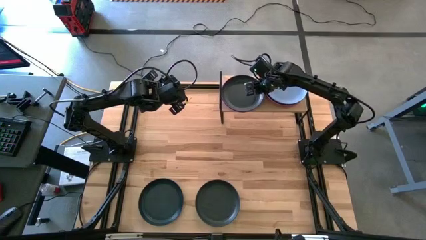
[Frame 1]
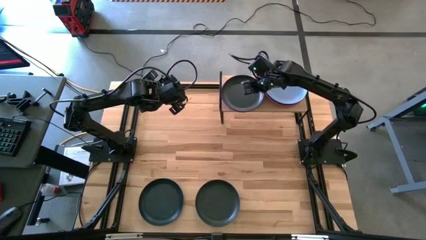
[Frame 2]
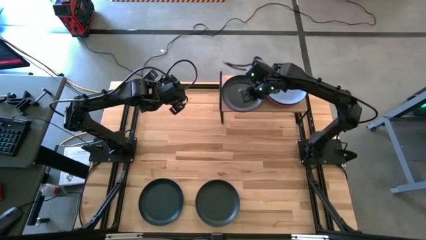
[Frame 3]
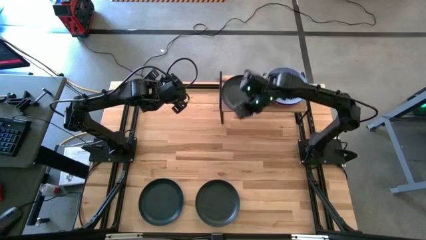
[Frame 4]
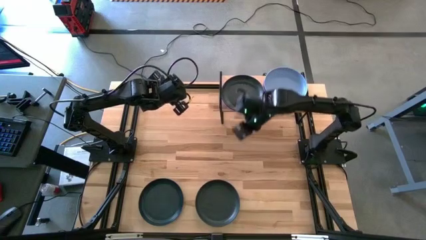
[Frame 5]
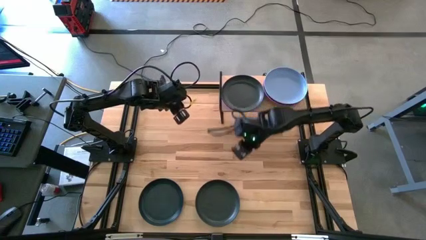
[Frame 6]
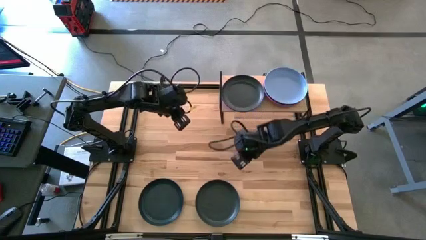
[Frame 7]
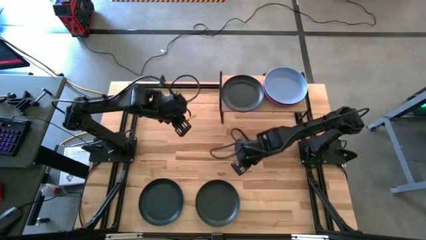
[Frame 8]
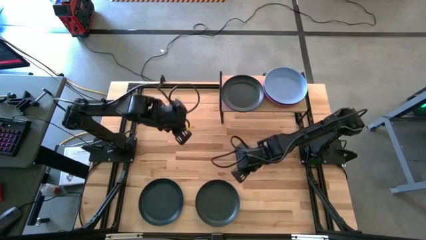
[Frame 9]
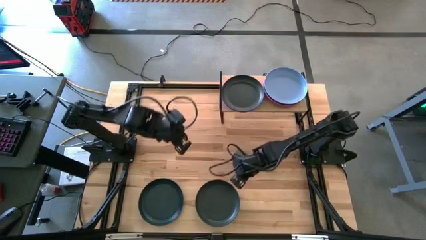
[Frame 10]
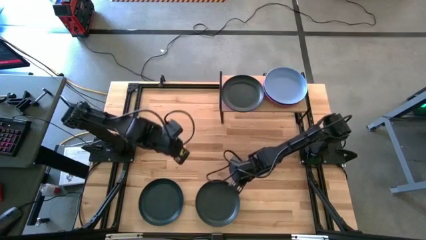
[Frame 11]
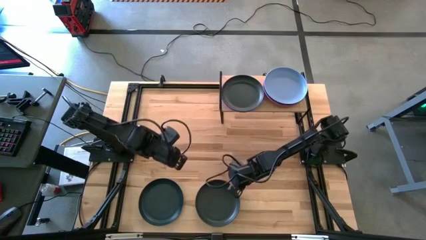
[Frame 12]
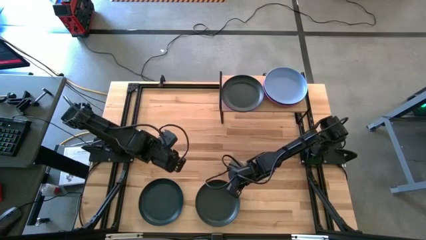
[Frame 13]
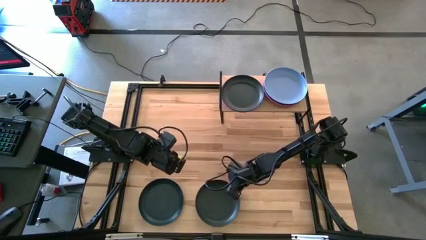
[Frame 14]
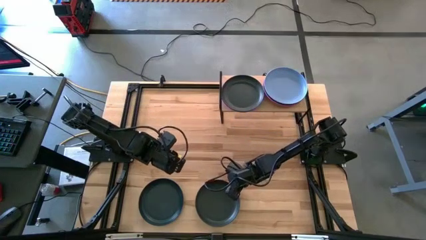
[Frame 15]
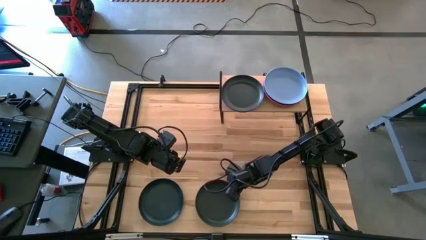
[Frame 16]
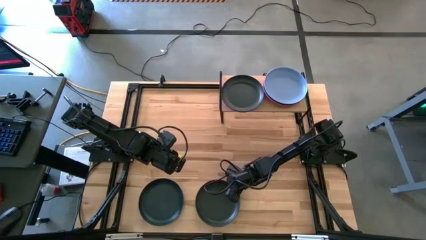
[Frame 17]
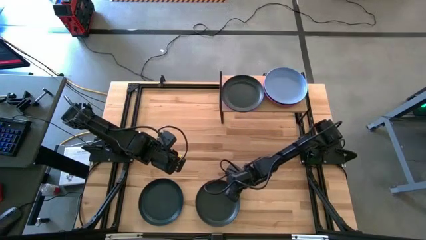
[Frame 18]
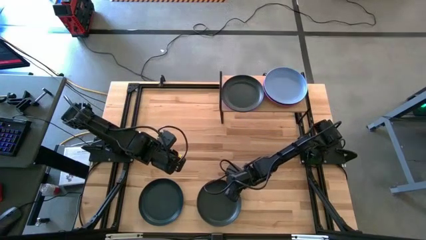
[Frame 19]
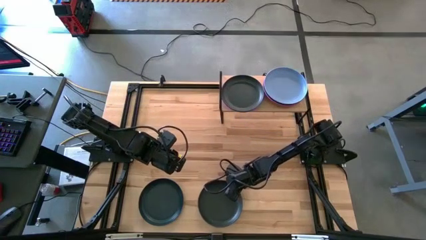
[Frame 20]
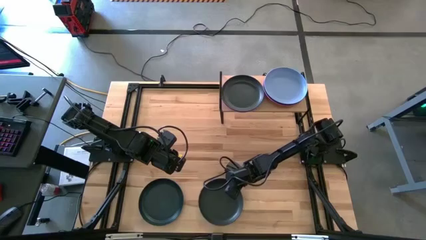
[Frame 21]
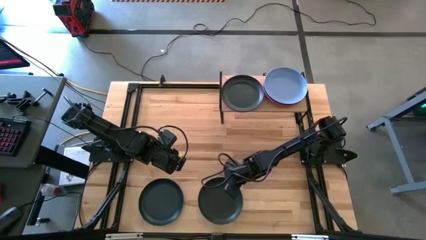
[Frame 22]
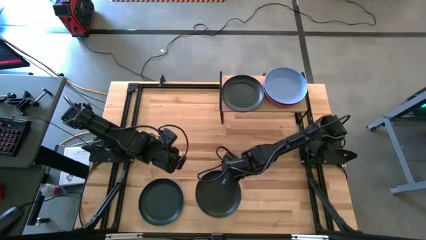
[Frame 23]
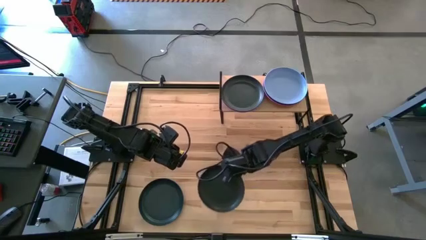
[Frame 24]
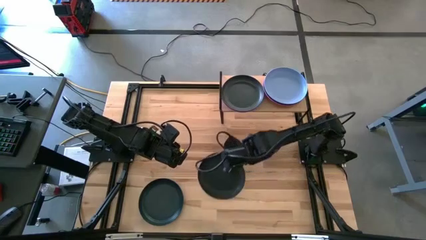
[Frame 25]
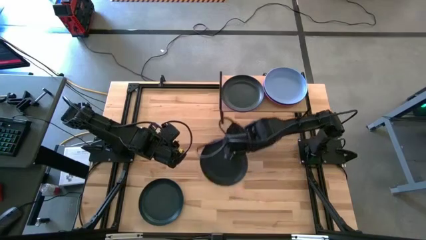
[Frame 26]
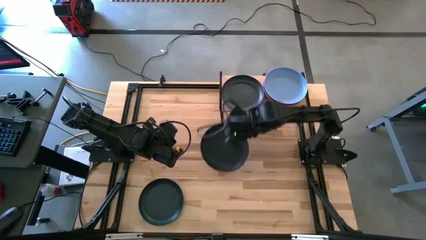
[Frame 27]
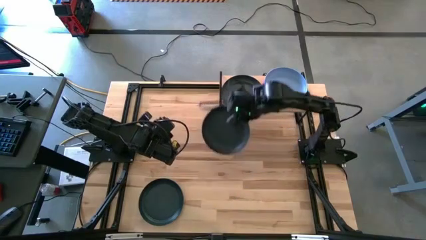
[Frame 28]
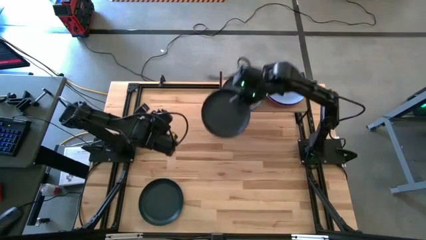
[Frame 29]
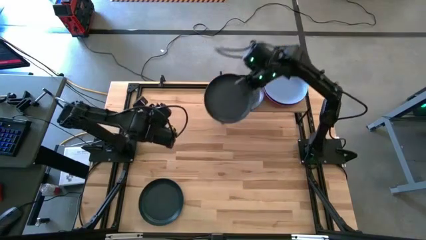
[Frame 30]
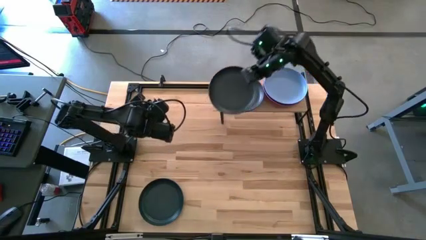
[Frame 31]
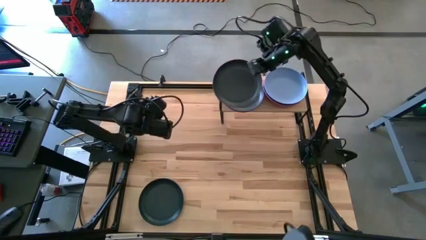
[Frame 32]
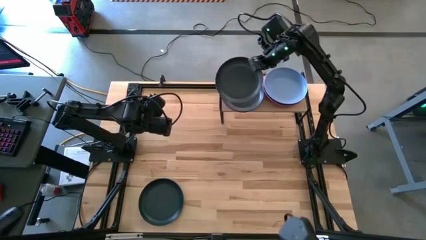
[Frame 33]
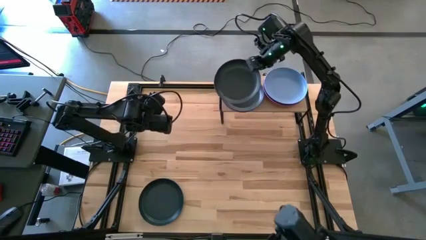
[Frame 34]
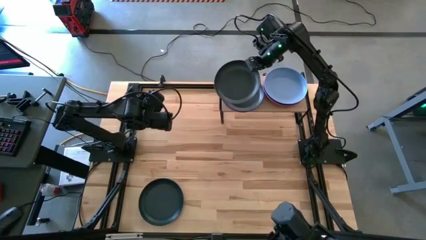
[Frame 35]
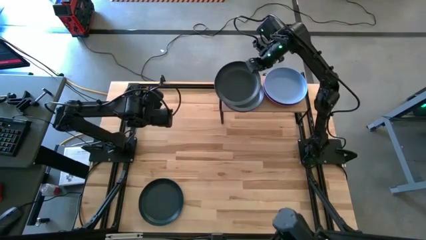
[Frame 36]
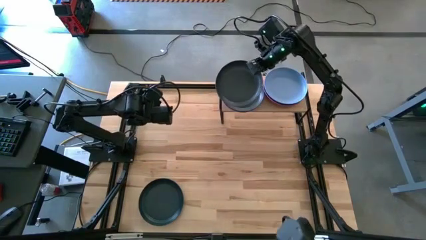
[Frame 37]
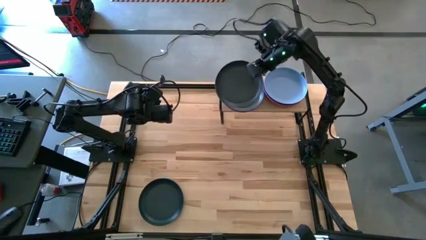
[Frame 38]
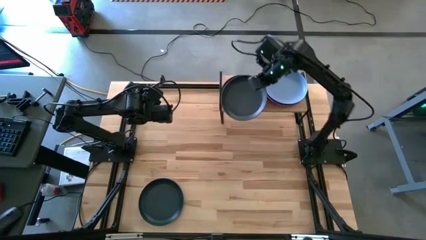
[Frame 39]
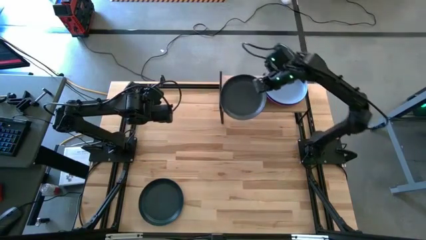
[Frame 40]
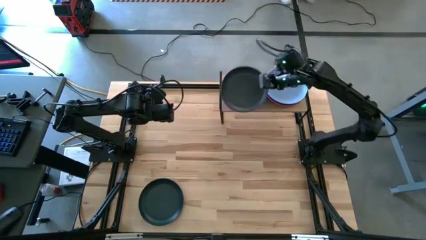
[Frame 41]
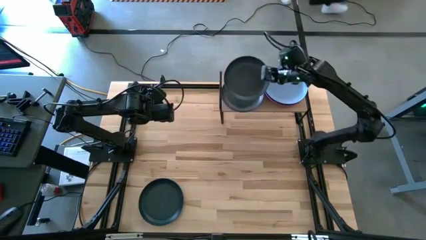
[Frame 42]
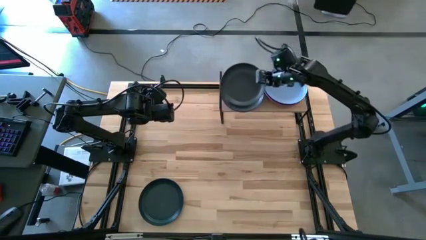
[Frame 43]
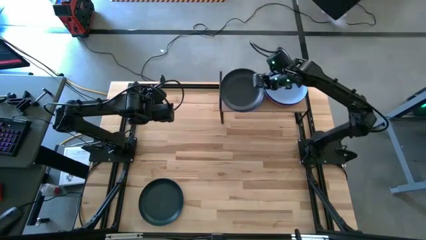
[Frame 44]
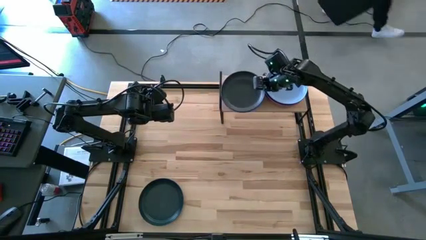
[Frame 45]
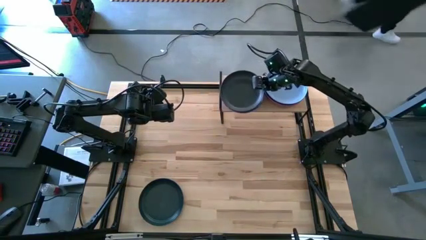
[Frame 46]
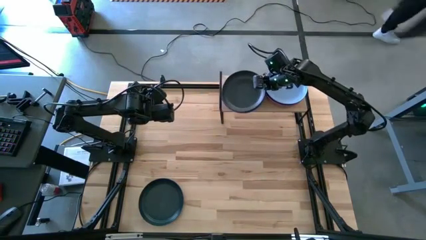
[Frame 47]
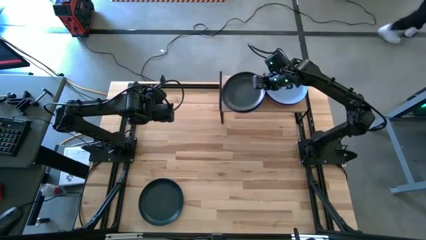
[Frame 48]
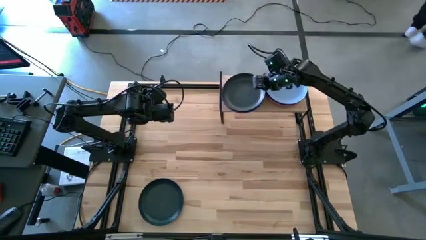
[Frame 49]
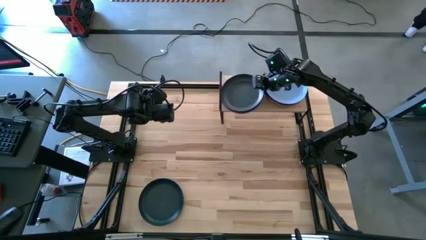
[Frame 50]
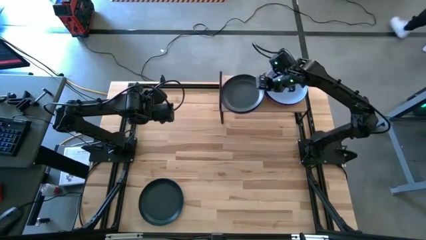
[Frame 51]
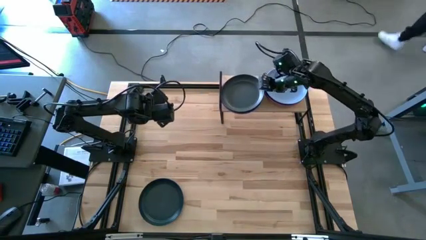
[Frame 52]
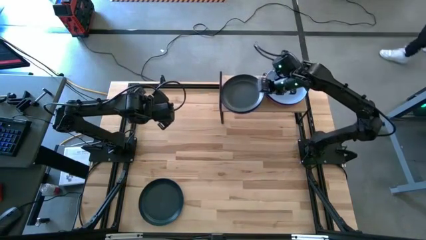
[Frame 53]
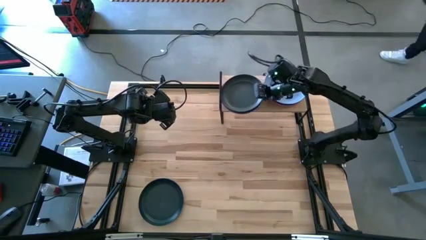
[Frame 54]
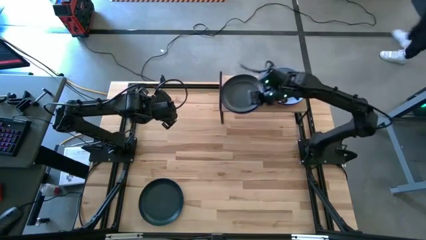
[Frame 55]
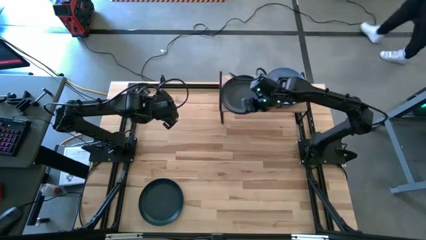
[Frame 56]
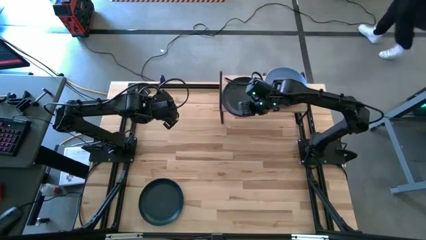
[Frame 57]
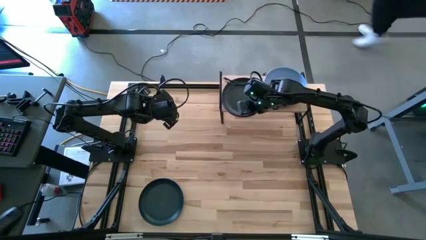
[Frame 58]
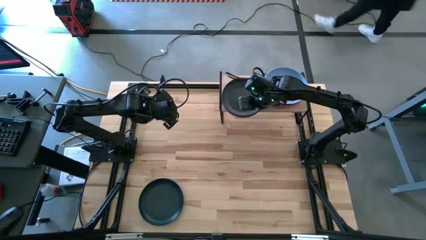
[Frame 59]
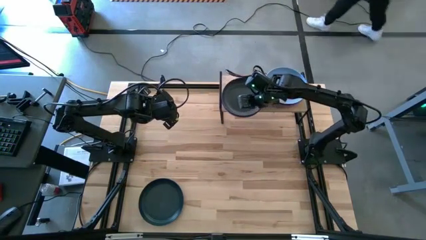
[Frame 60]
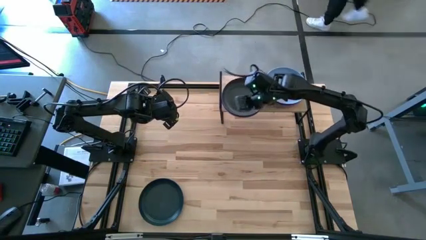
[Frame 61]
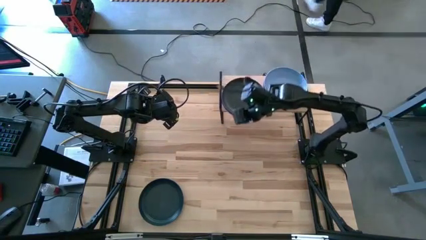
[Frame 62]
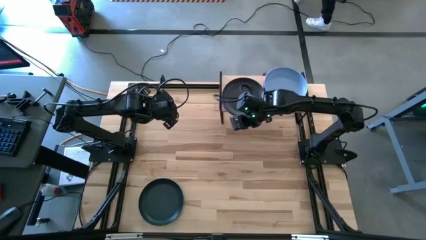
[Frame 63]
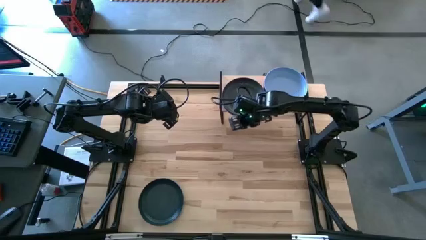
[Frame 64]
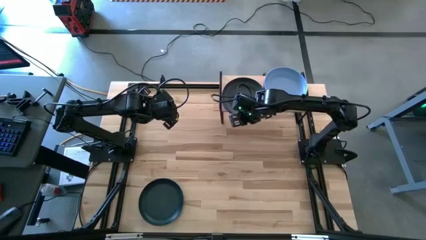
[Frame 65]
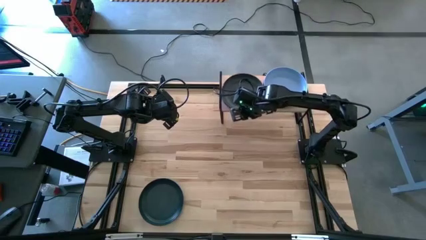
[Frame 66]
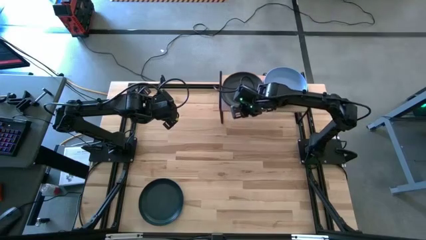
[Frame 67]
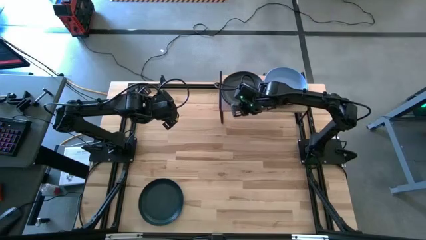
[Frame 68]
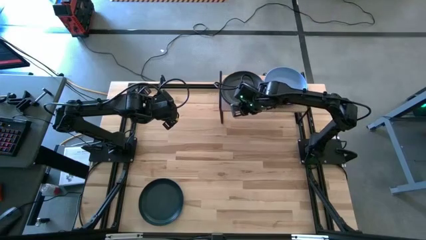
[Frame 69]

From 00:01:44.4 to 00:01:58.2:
Task: Place and stack plates onto a shelf
Stack the right black plate on top of the other black plate on the shelf

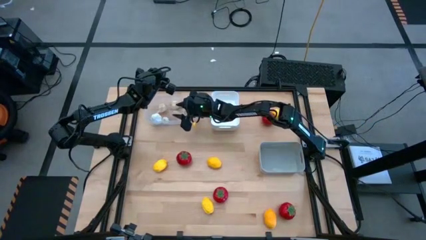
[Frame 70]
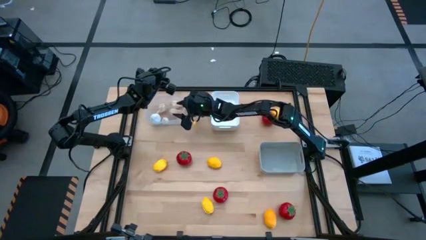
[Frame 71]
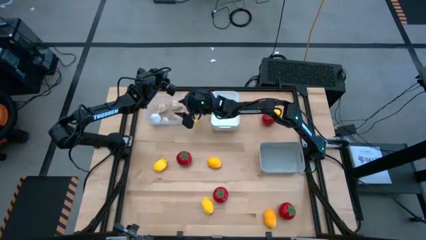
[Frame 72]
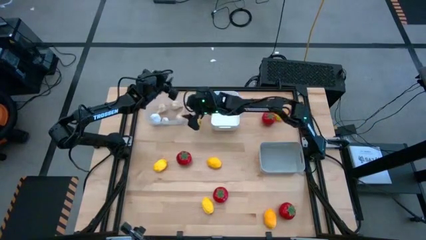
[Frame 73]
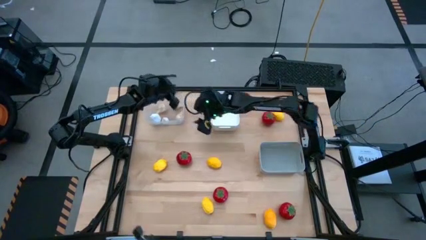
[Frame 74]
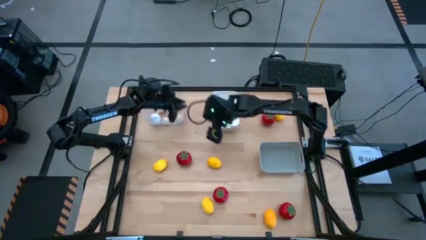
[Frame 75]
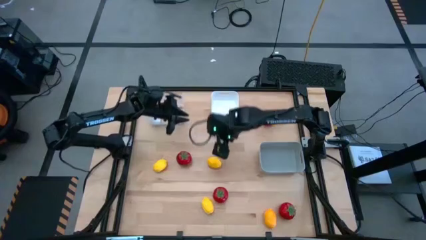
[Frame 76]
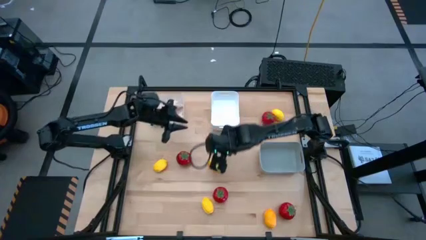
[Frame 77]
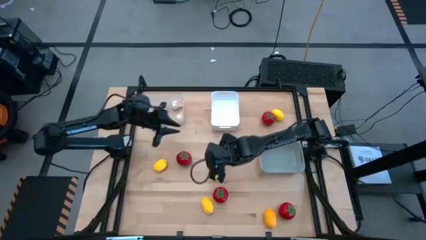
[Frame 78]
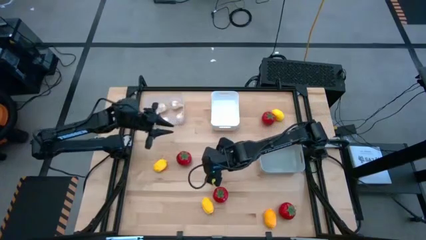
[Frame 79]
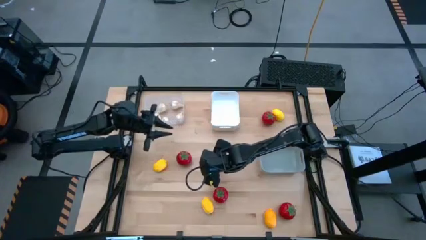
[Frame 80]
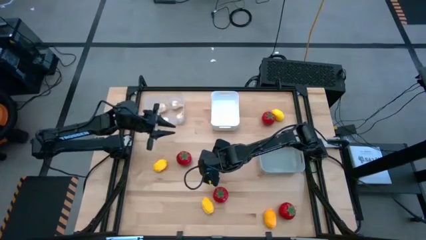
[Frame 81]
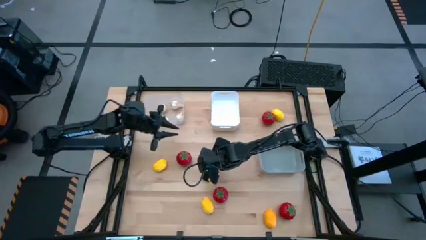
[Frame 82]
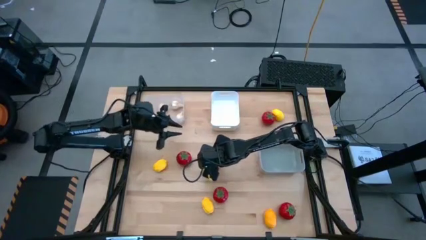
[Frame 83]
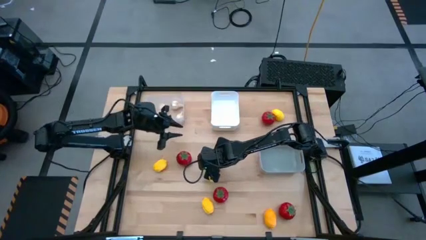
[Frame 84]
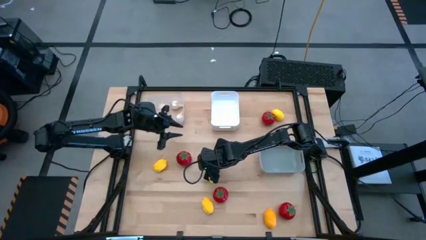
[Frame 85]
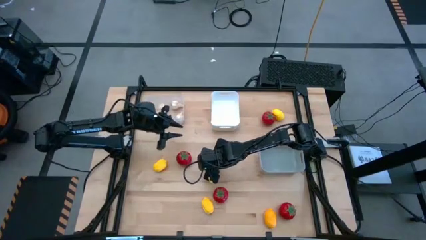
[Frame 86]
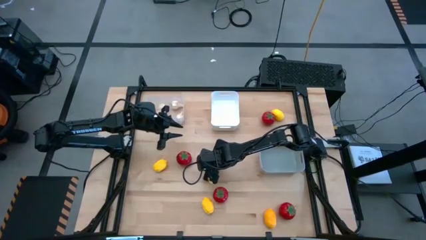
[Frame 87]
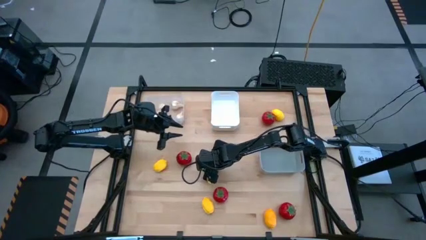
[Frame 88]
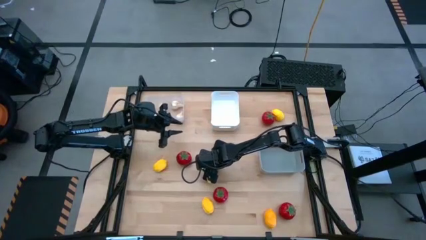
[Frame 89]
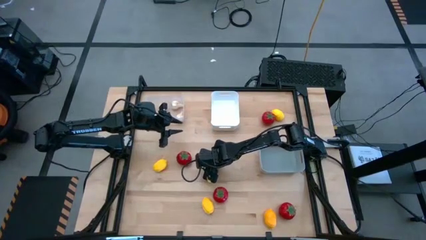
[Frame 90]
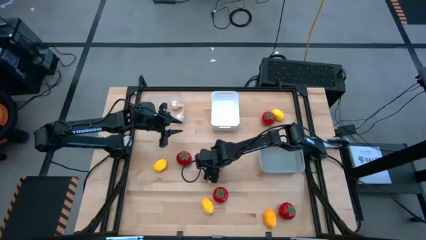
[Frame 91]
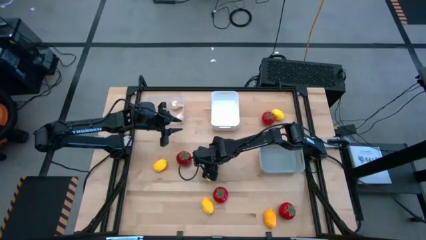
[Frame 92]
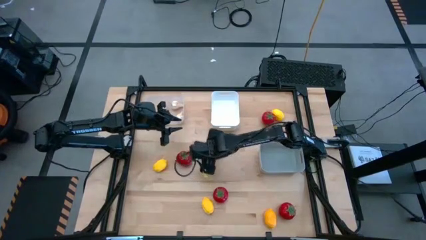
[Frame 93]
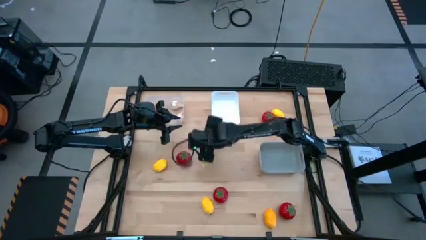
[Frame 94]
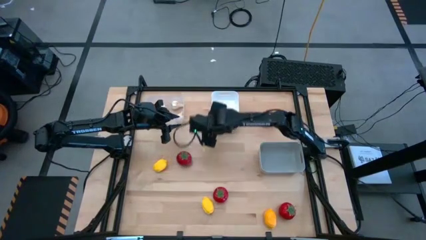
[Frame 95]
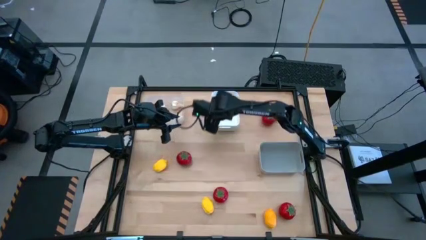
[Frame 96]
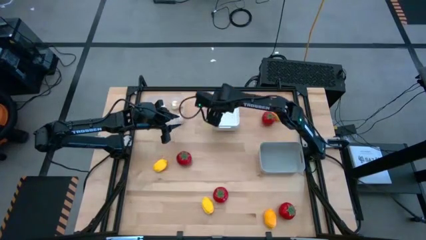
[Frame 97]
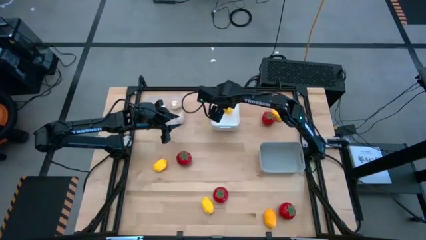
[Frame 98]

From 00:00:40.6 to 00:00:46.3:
Task: Sort produce into baskets
Put the lemon into the white bin
